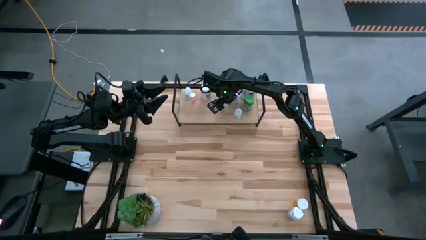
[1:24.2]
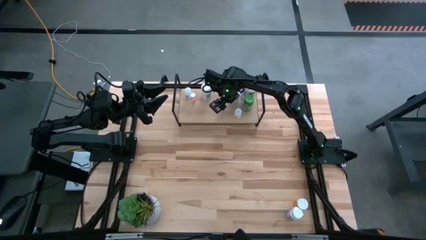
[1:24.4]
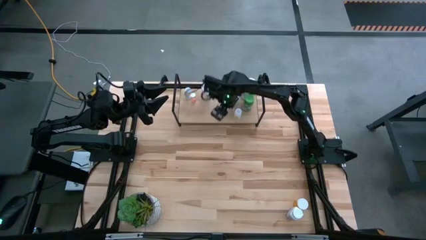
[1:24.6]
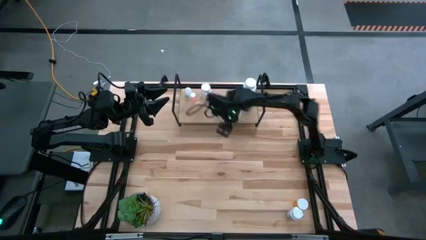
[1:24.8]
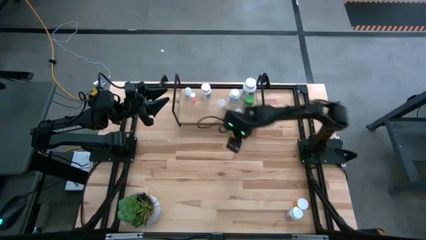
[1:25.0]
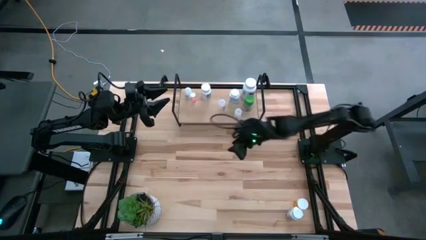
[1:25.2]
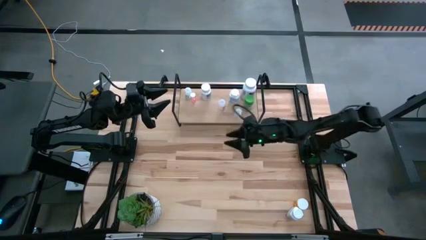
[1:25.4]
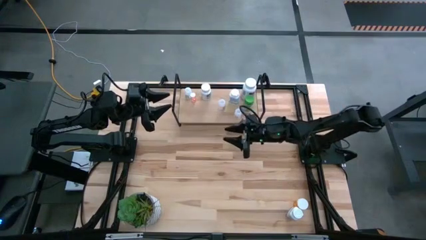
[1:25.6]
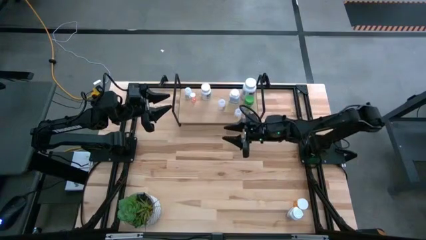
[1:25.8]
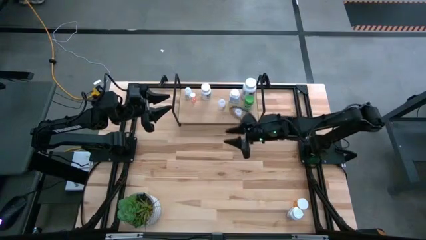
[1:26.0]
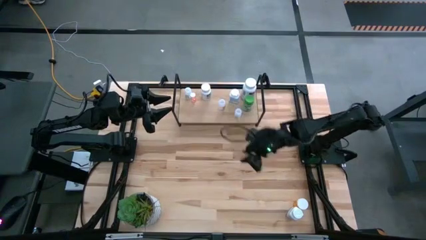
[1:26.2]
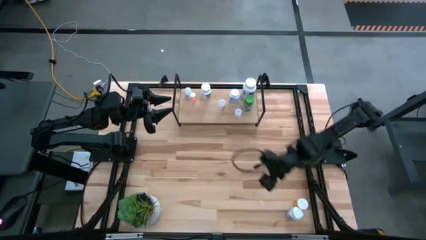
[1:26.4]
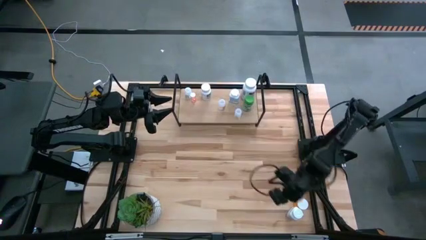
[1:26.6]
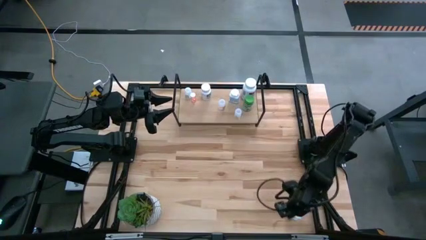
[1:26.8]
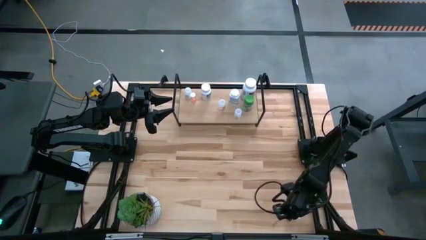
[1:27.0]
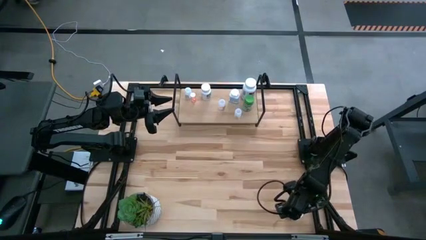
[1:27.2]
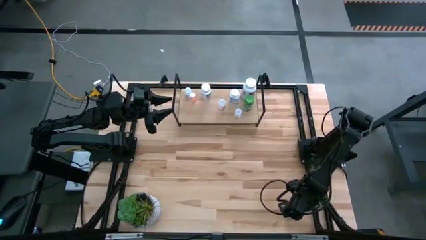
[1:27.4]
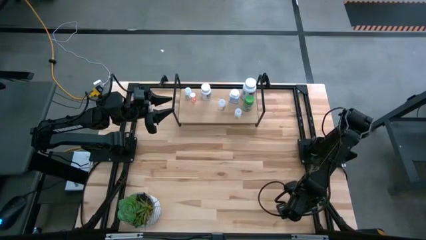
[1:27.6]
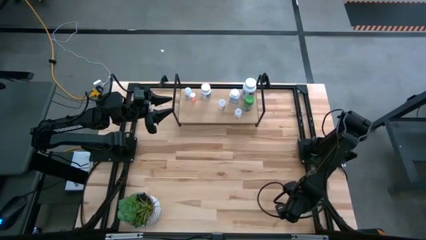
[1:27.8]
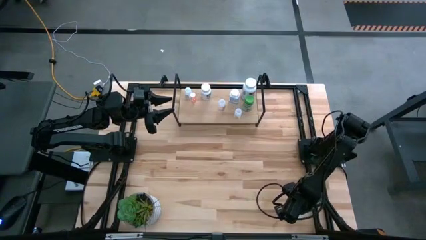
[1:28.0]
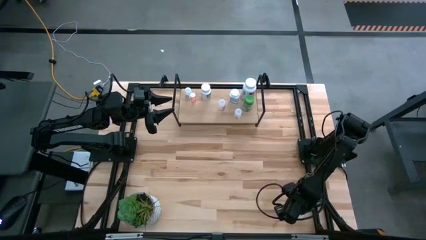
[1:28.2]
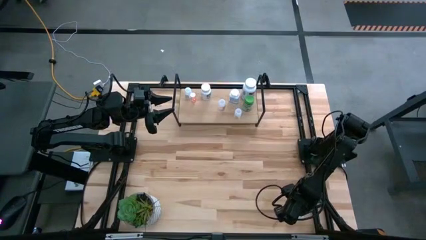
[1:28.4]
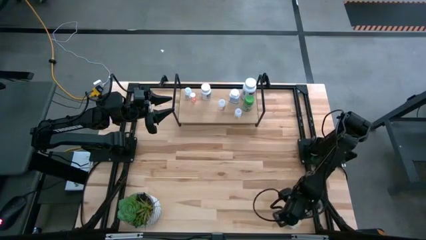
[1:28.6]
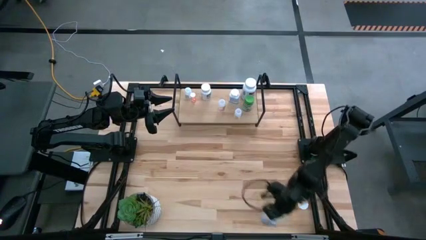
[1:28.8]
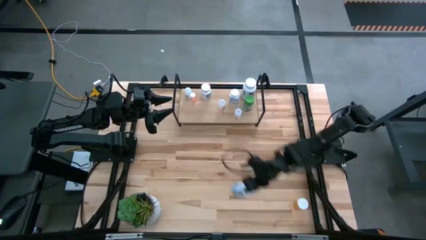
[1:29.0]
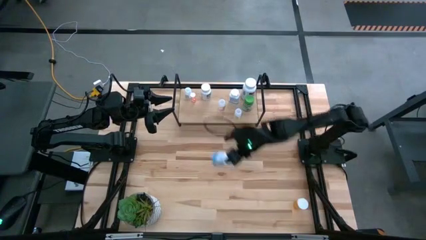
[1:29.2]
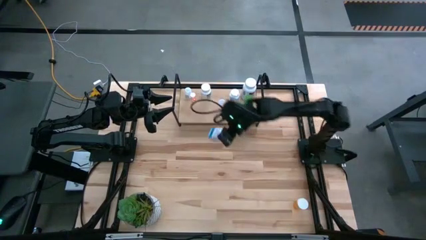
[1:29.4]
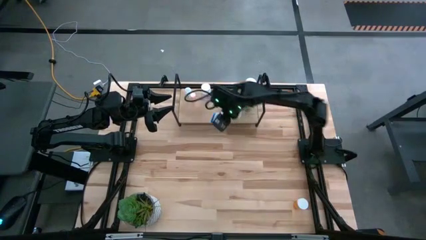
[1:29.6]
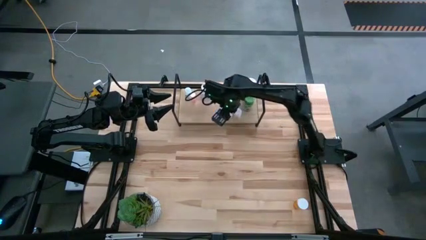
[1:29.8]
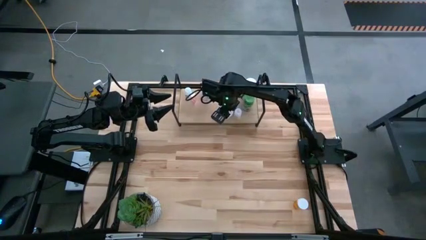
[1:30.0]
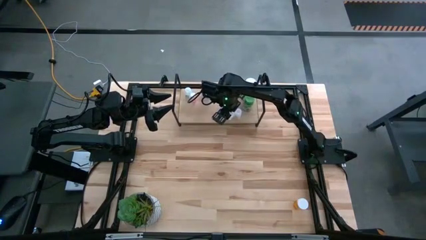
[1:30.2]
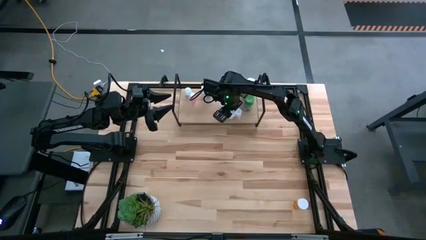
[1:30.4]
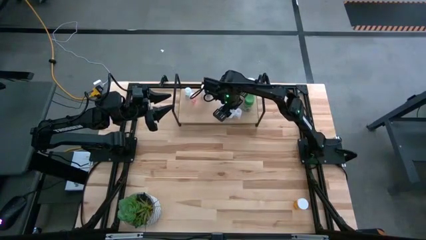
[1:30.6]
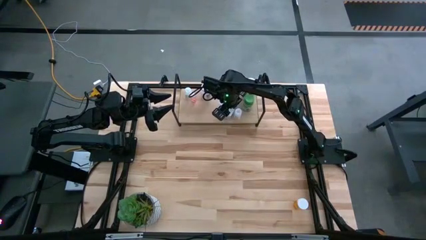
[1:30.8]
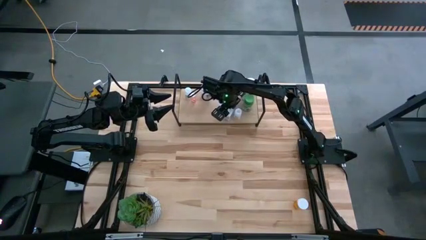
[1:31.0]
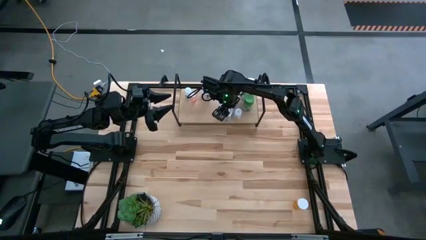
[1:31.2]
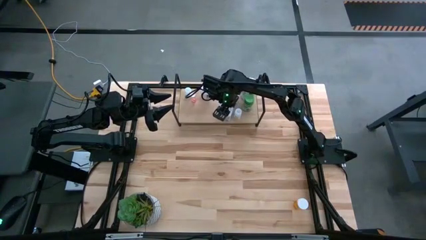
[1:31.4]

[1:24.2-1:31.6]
Task: Pick and place medicine bottles onto shelf by color
Put the white pill bottle into the shelf

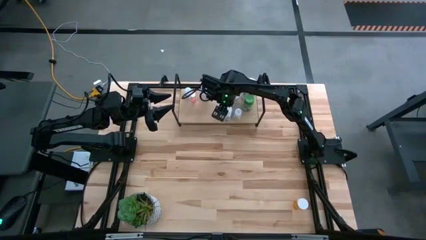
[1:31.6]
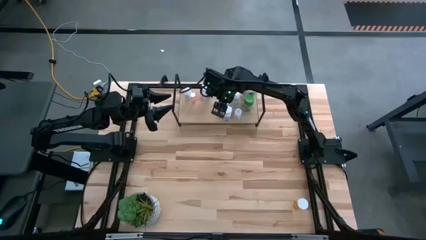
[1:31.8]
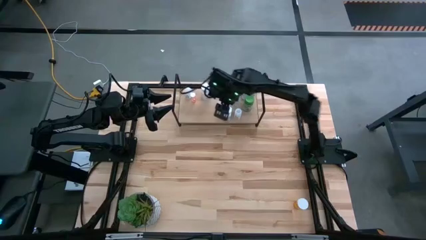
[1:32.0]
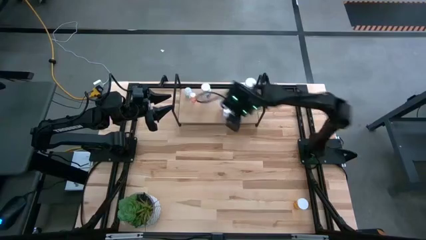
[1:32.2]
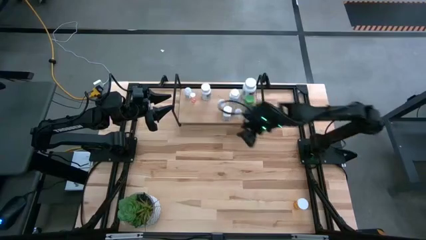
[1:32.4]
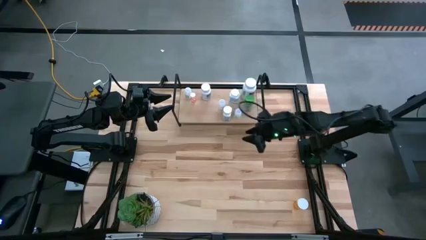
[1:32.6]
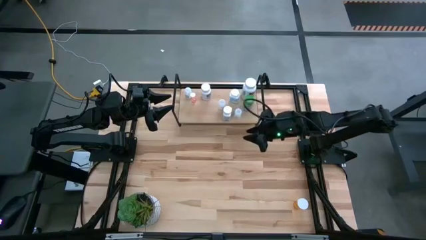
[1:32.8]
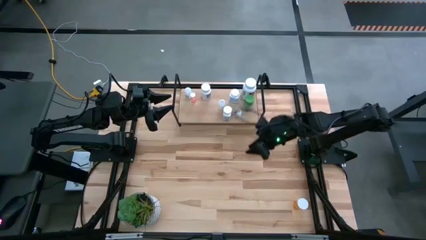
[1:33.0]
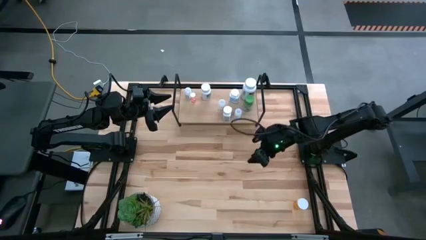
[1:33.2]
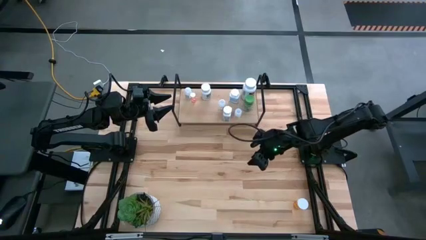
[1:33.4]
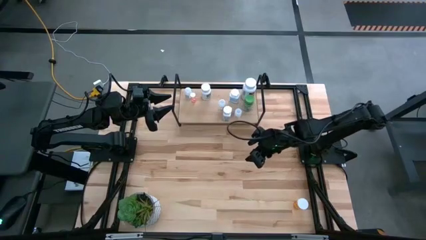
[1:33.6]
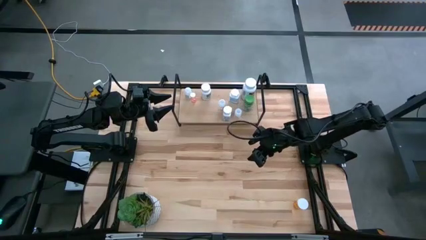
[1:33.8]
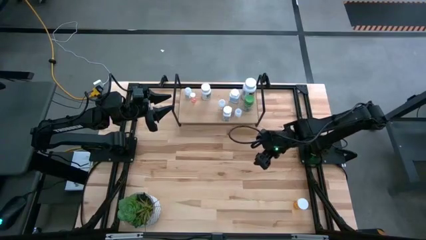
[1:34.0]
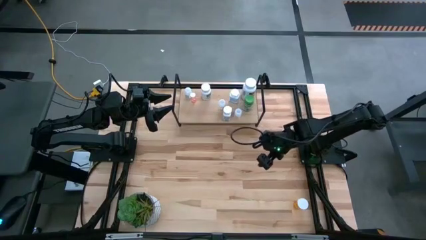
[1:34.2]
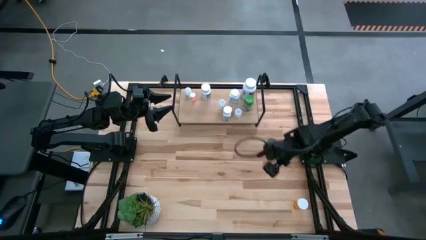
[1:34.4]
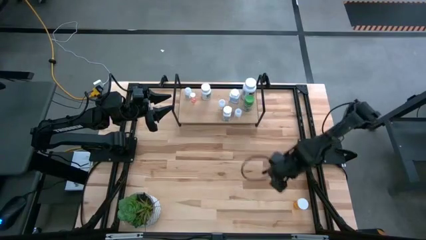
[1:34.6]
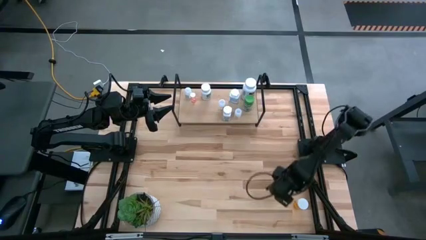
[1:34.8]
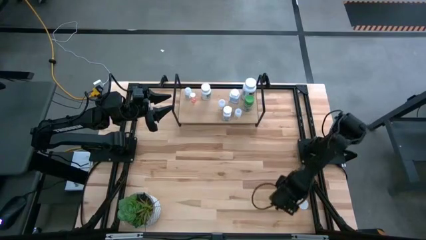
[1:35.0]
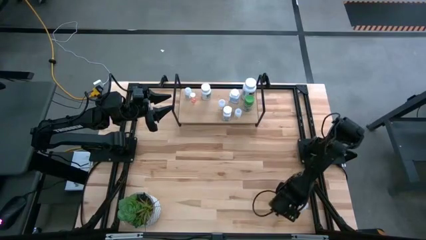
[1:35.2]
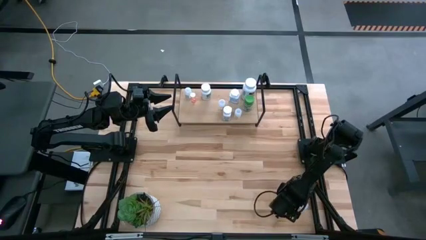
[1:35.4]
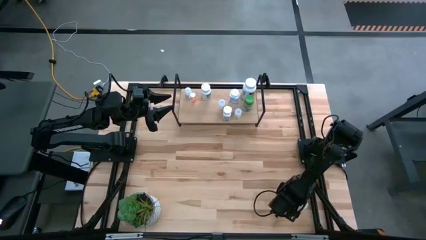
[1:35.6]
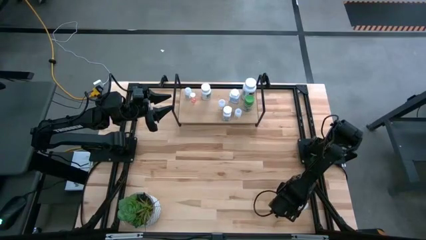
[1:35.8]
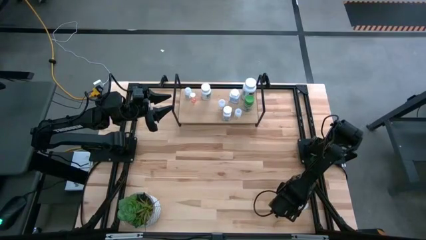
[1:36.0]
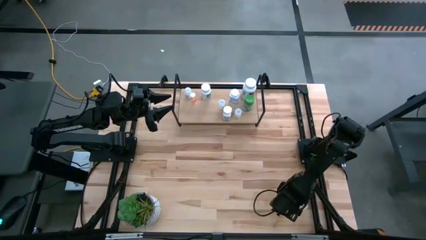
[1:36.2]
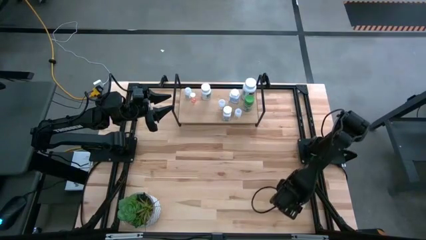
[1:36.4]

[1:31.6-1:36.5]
Put the orange pill bottle on the shelf
